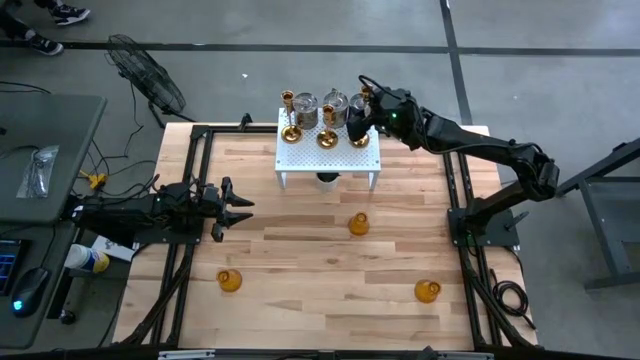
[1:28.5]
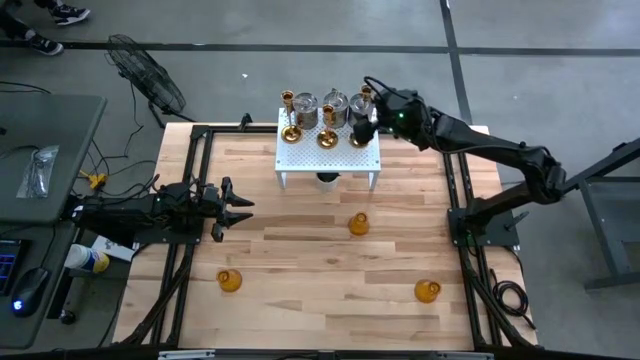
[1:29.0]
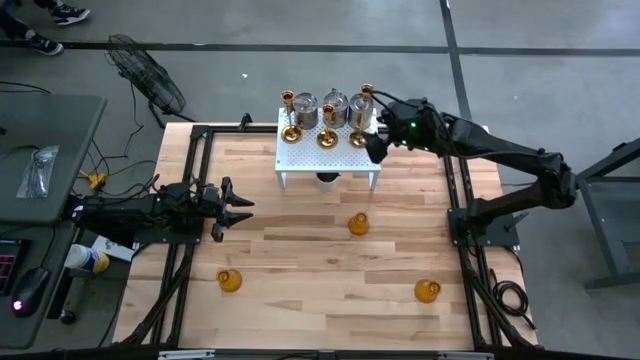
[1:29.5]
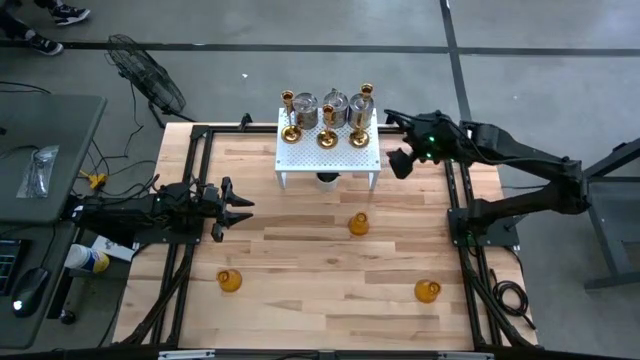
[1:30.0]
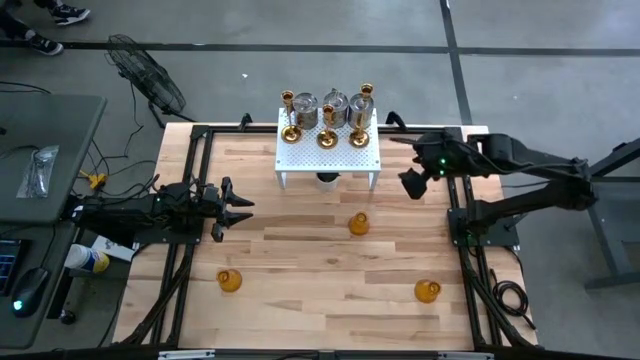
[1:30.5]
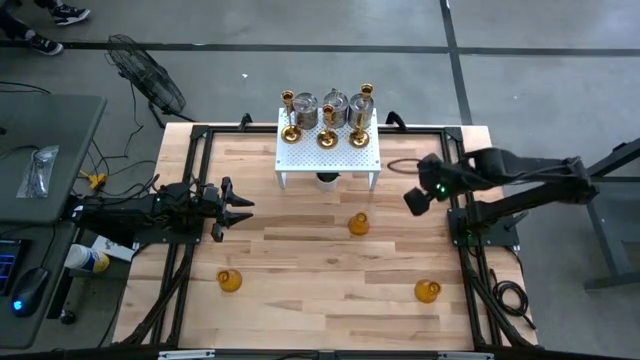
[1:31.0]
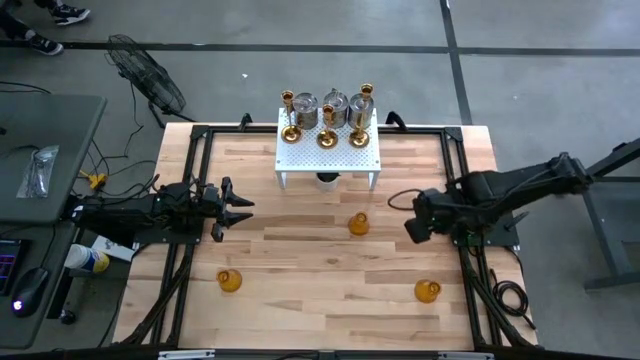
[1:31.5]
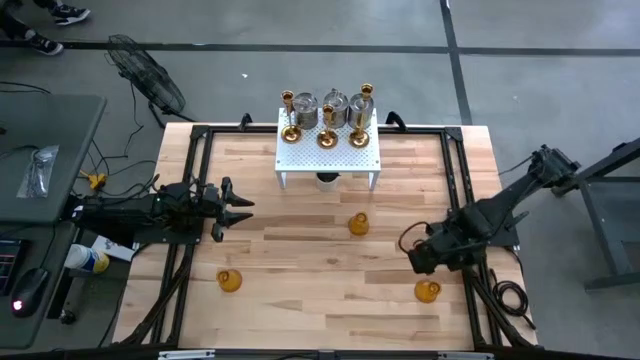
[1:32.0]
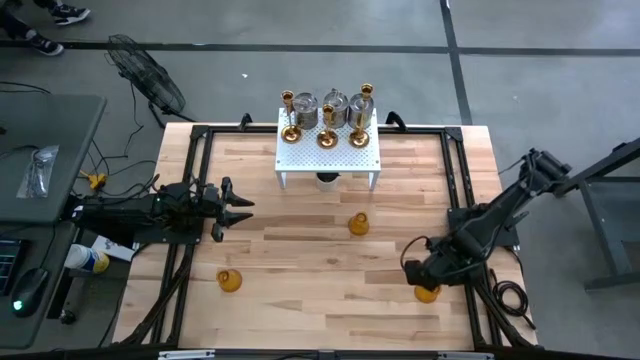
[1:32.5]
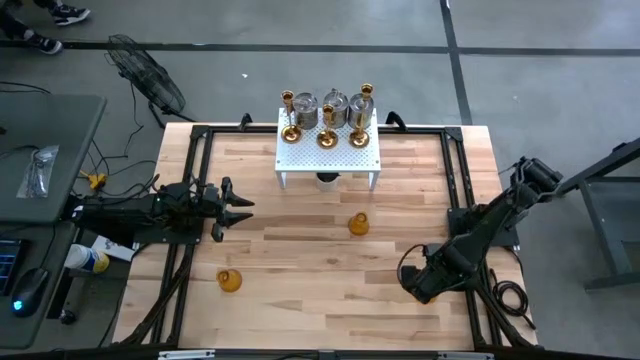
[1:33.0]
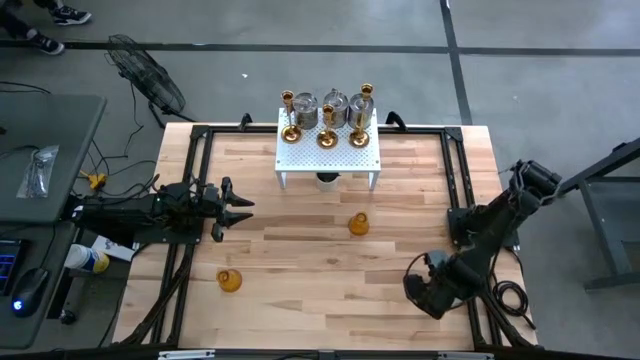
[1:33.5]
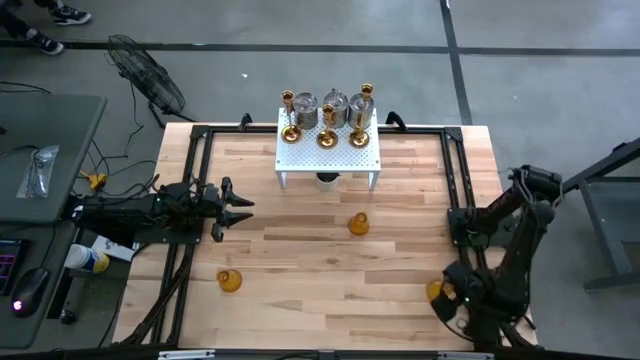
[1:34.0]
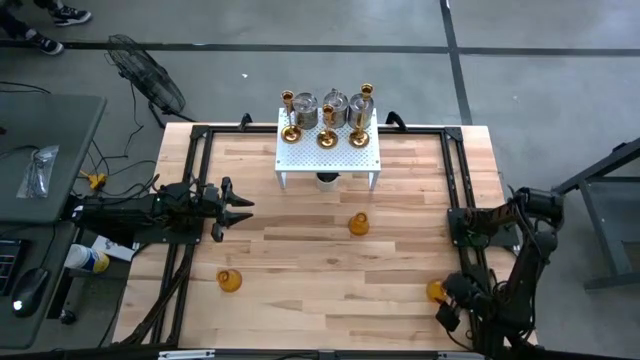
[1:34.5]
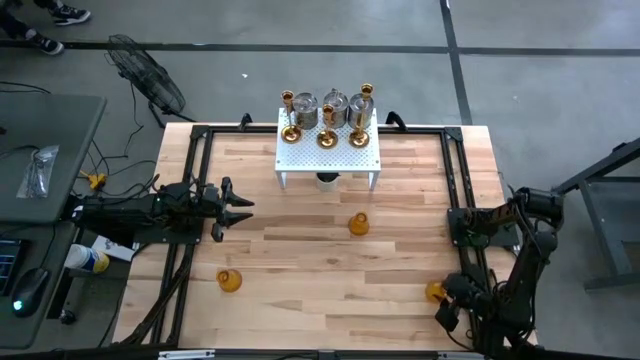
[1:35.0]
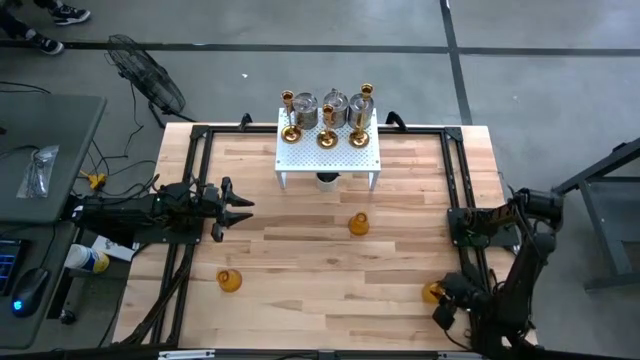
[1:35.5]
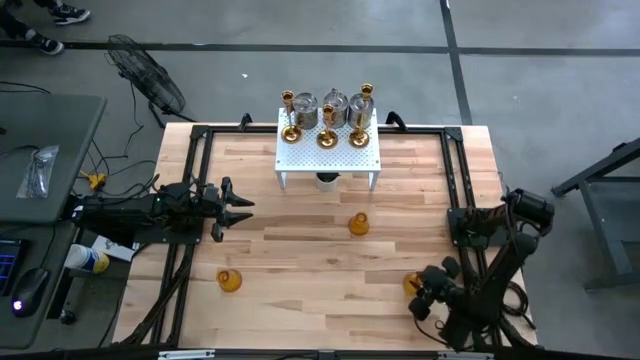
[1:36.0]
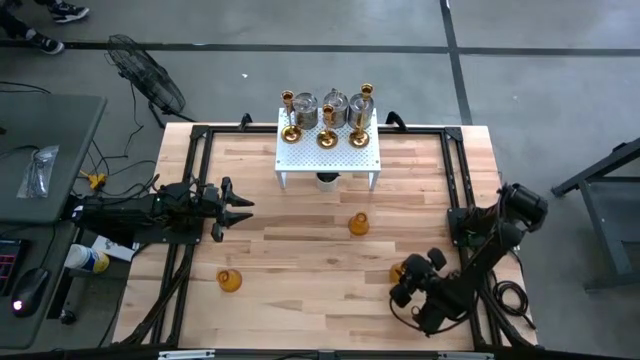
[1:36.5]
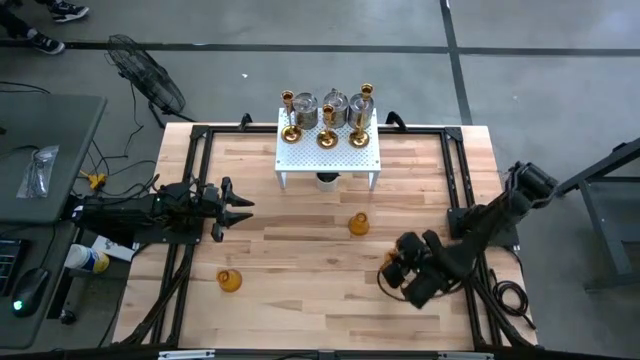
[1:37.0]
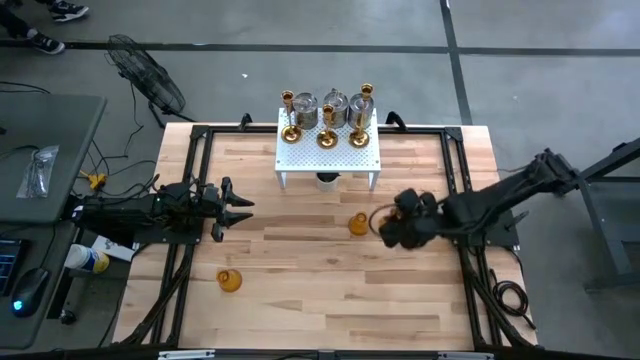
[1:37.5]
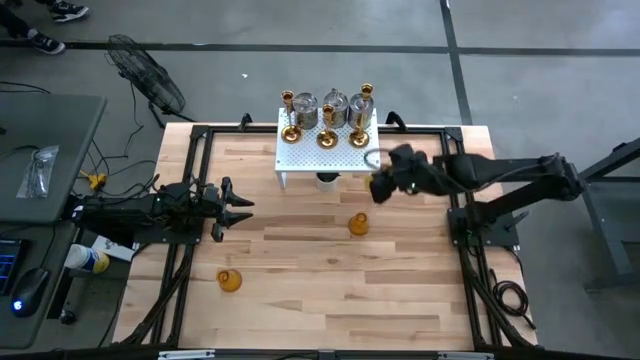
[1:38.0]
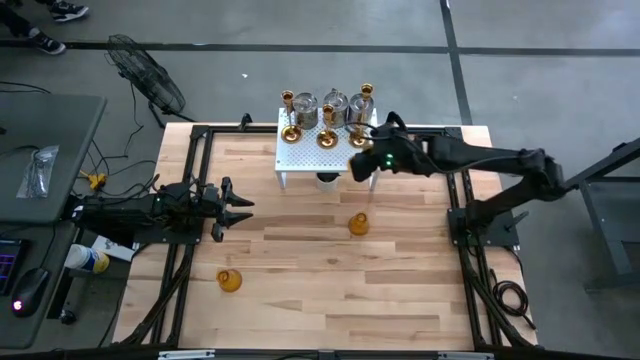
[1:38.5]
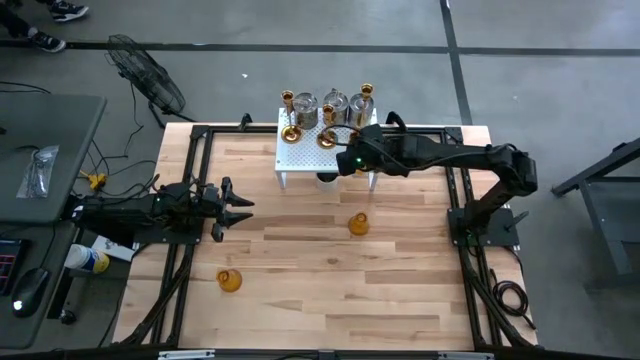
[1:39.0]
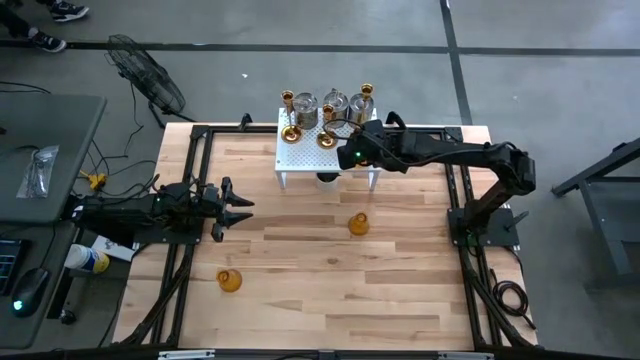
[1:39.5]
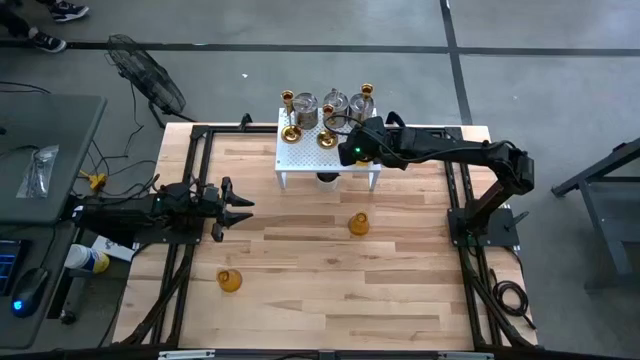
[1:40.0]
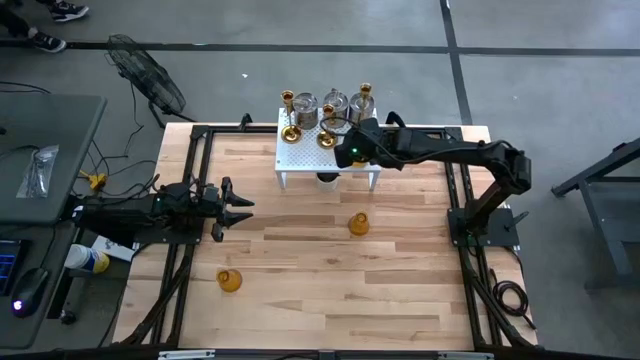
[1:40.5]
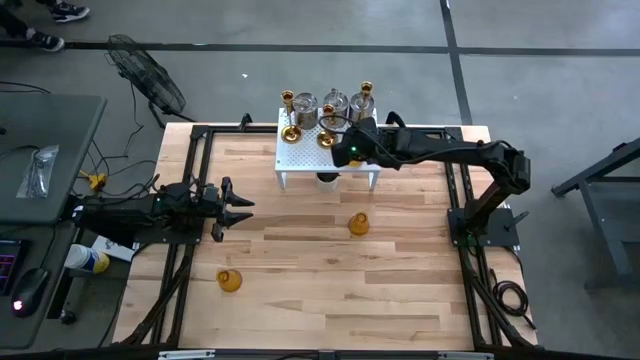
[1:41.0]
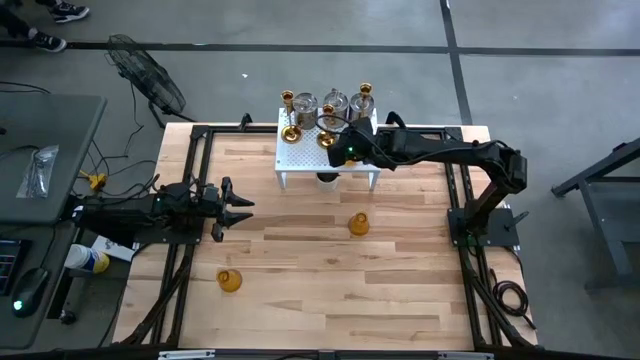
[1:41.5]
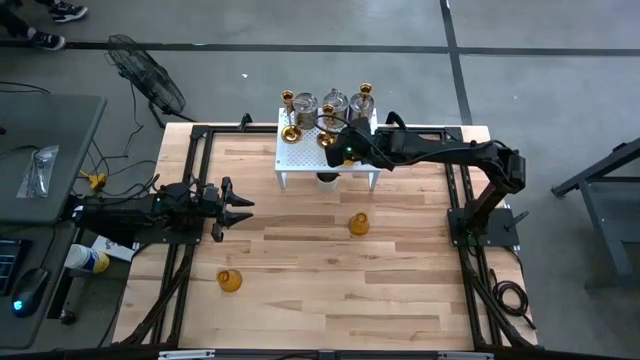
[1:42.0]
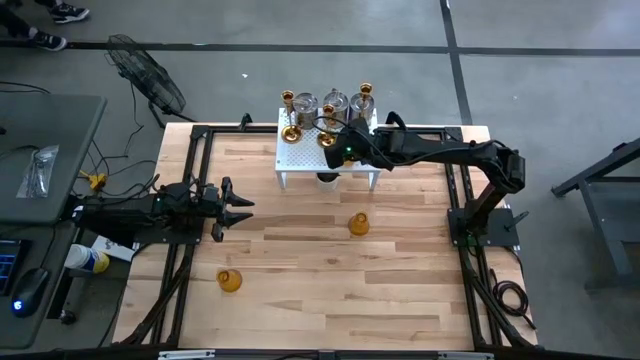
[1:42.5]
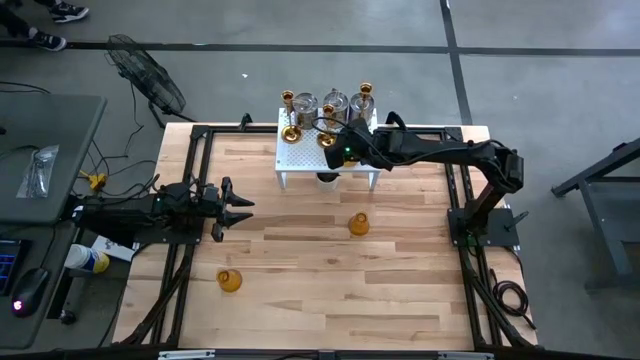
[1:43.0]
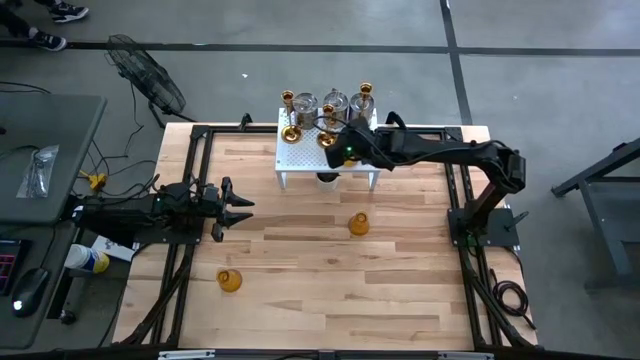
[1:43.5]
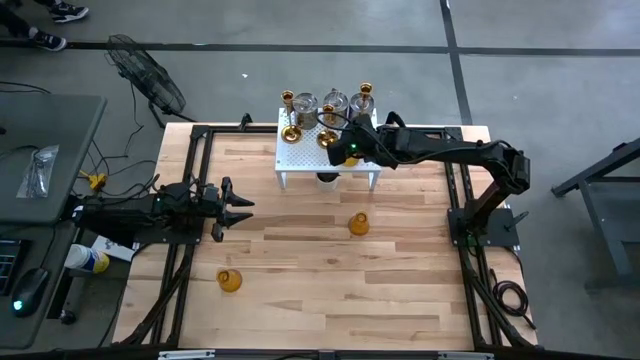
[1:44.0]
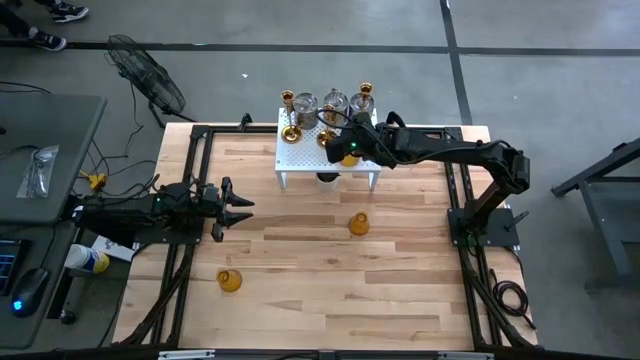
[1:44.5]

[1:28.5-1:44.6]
Task: Pick & Place candle stick holders
Put the bottom right gold candle holder on the shelf
